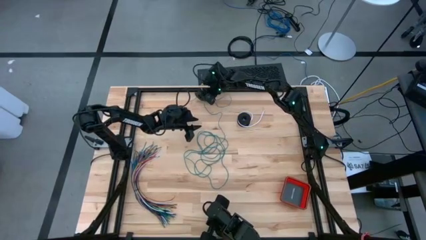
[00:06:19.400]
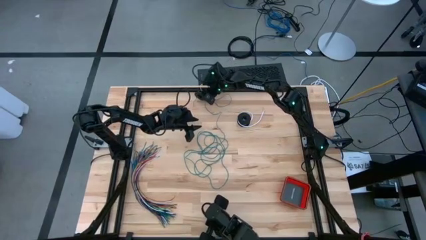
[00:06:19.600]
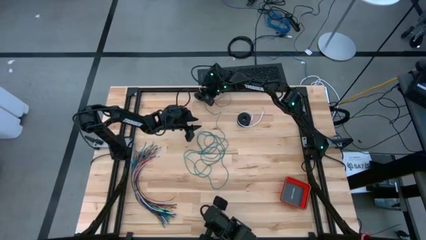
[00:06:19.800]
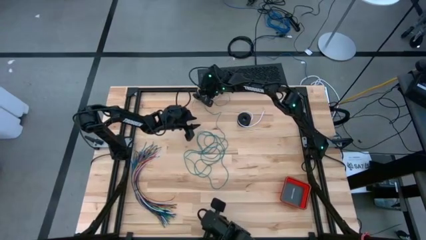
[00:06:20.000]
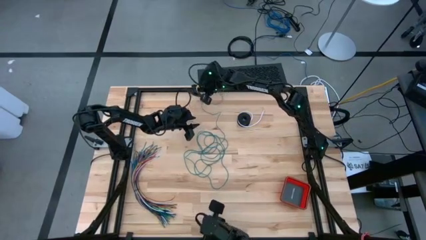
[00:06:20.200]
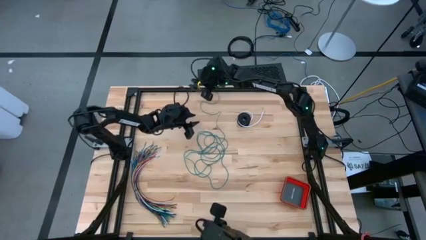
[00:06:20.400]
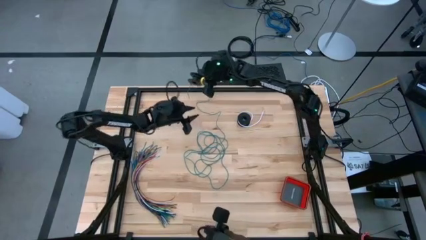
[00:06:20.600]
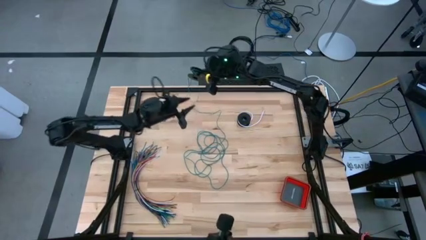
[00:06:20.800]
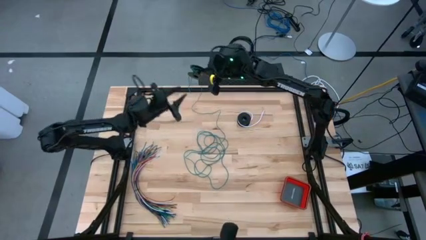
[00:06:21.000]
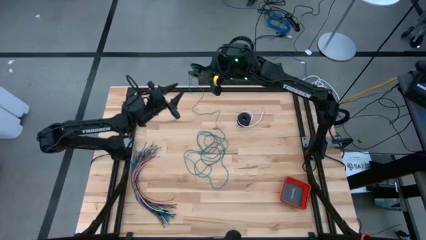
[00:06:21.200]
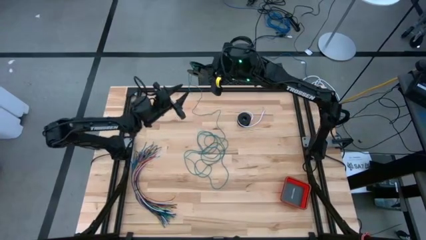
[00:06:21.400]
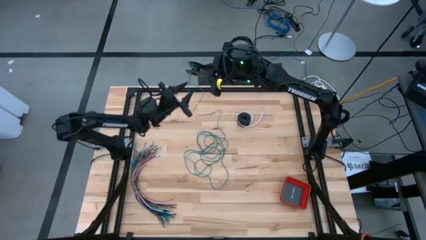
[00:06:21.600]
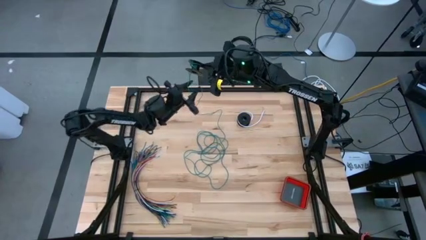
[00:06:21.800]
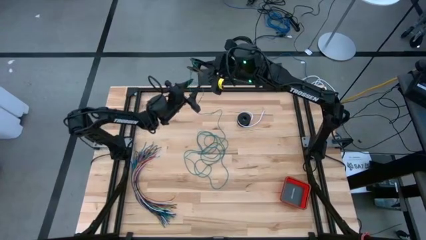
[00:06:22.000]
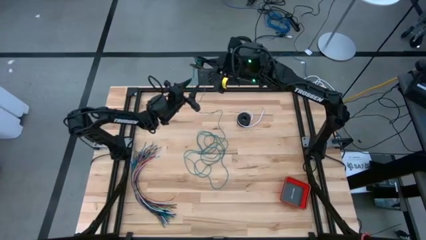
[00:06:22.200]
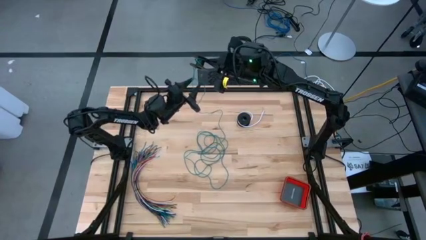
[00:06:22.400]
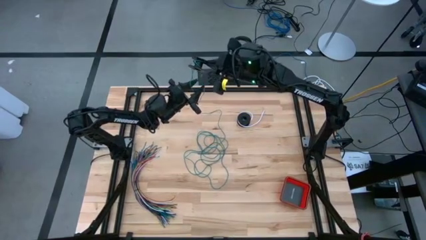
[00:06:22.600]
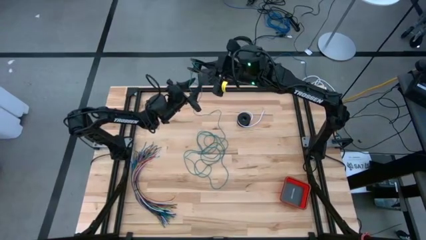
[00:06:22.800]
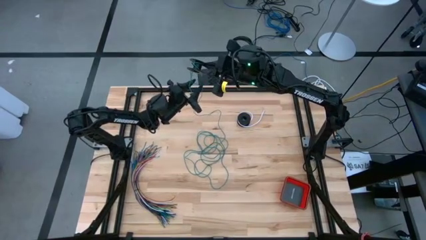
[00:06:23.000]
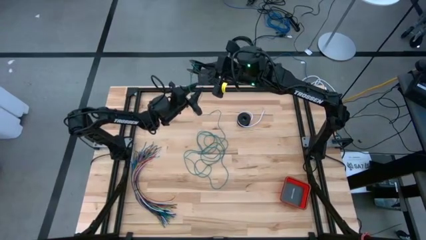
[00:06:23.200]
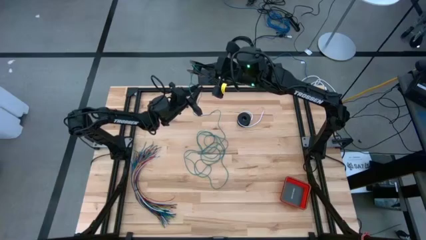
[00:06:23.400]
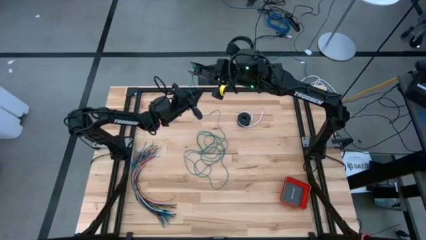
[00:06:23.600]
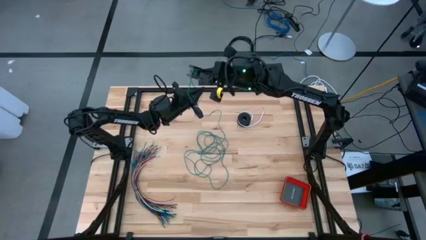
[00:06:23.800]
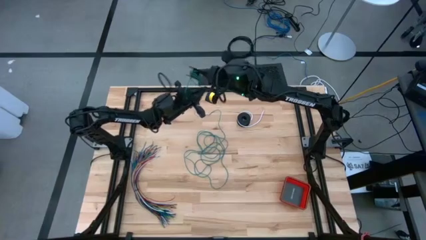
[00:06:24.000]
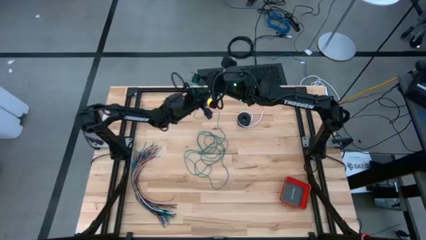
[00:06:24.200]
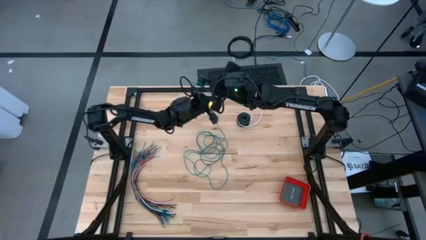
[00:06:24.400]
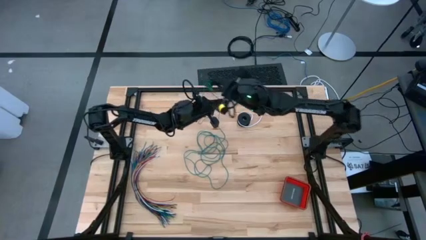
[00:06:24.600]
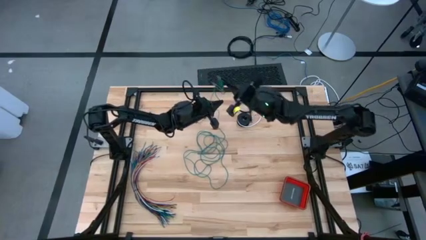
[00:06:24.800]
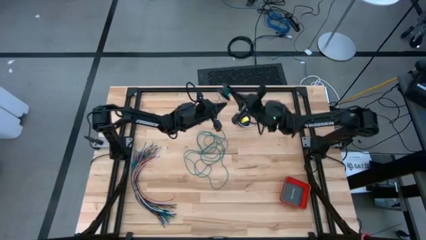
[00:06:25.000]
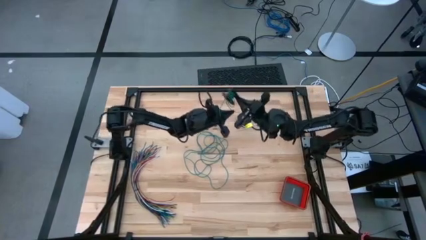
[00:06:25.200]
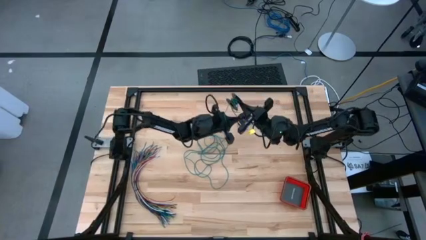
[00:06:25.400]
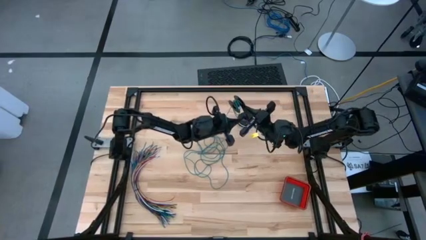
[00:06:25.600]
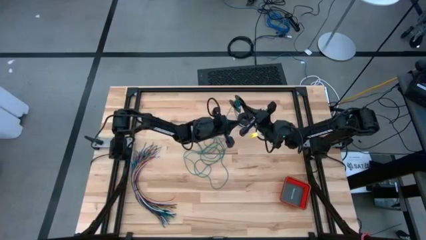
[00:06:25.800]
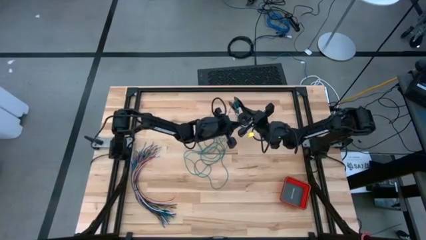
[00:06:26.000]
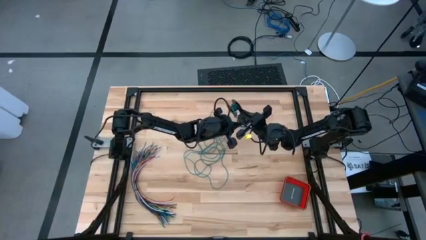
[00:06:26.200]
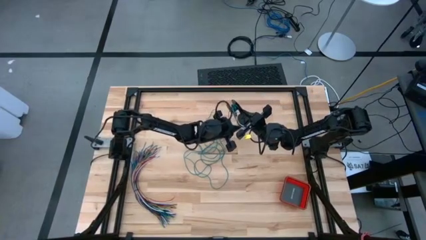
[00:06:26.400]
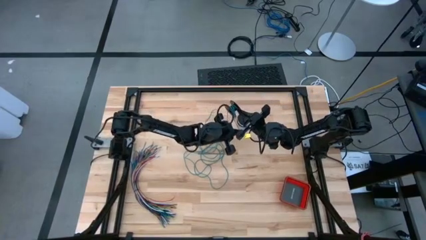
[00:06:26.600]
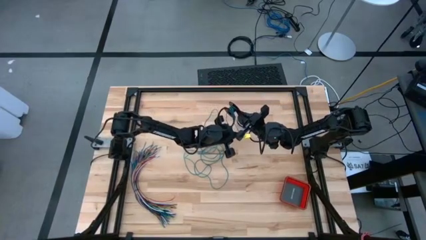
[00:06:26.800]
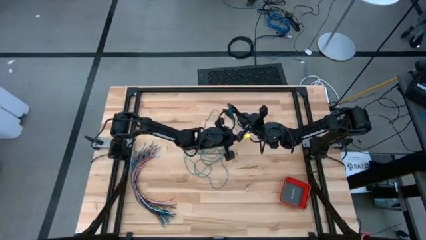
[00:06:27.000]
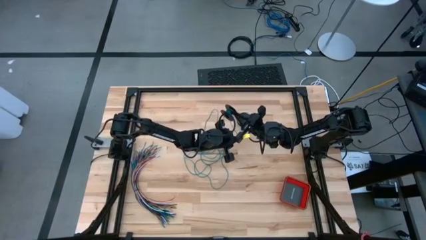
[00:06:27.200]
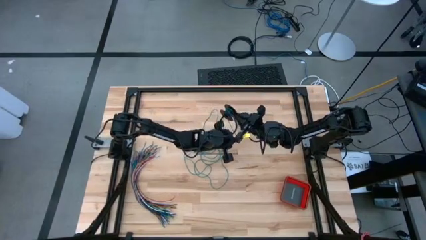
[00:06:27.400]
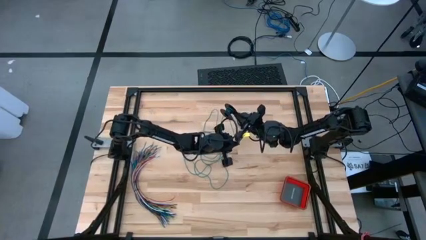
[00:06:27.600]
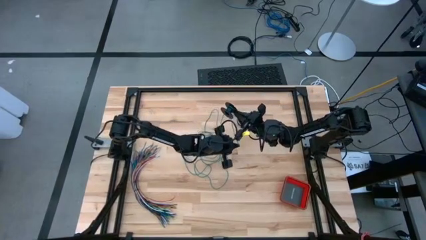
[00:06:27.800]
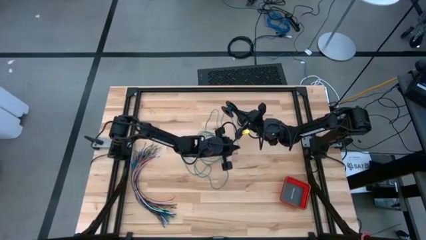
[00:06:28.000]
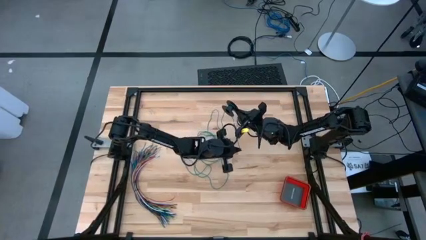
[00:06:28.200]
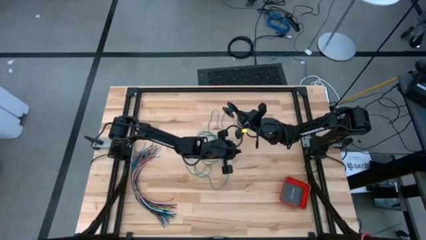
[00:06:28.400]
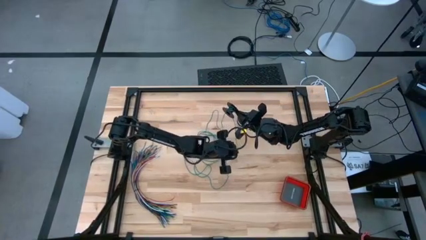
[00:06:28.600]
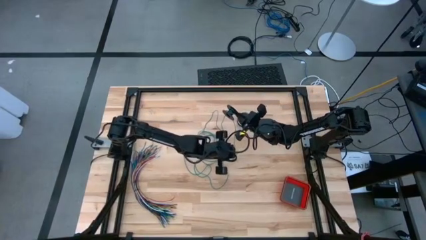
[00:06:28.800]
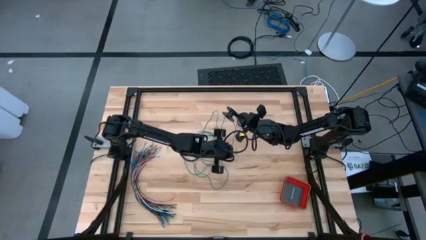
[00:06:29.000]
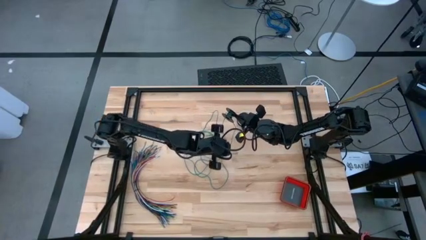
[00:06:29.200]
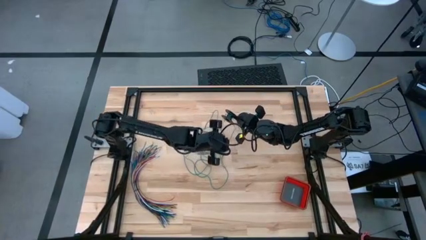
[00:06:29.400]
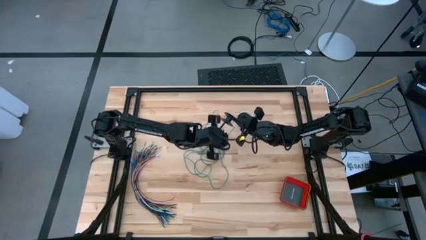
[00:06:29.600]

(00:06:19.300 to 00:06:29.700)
Task: Coil cords
Coil the green wire onto the spool

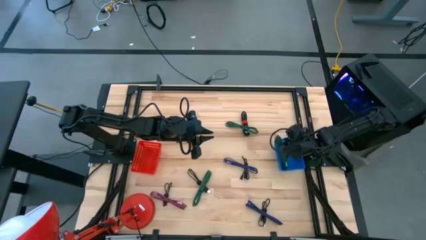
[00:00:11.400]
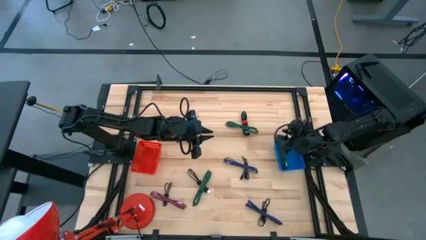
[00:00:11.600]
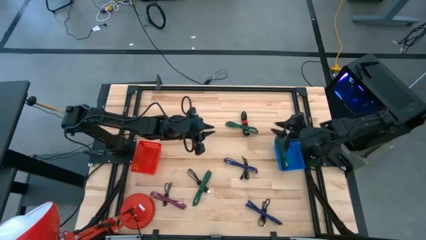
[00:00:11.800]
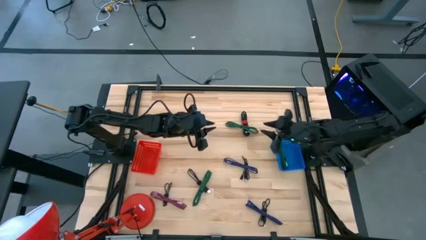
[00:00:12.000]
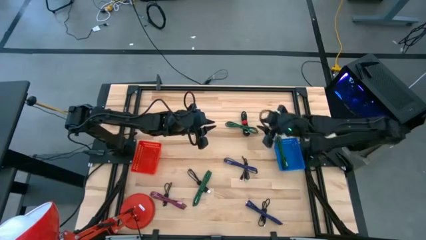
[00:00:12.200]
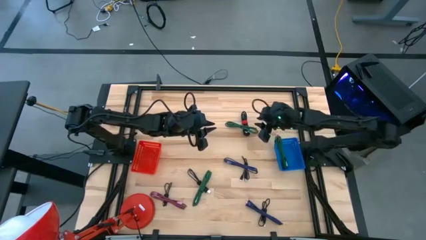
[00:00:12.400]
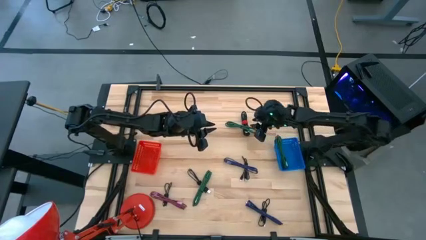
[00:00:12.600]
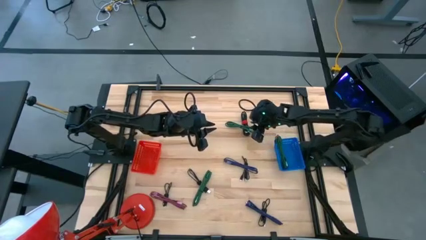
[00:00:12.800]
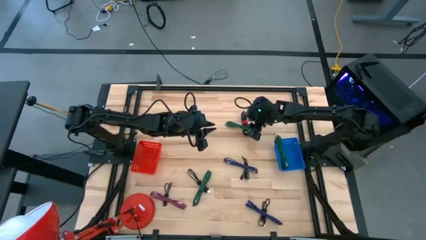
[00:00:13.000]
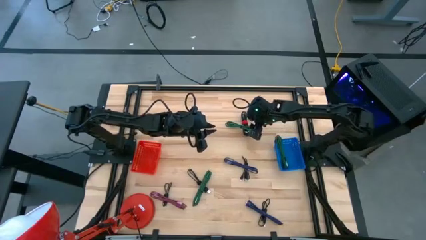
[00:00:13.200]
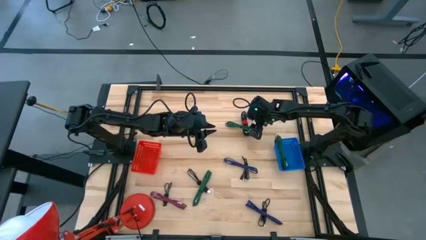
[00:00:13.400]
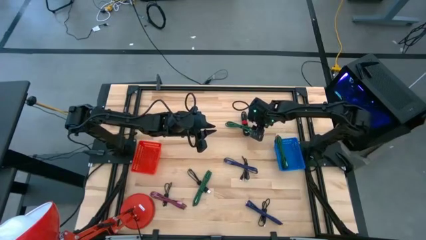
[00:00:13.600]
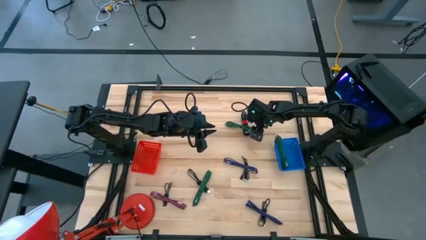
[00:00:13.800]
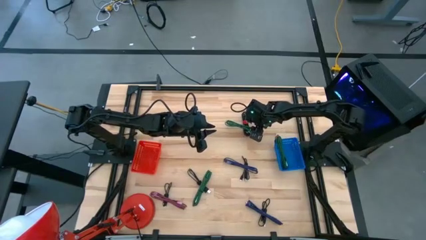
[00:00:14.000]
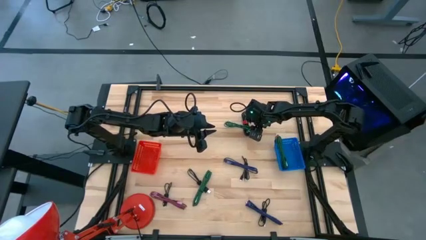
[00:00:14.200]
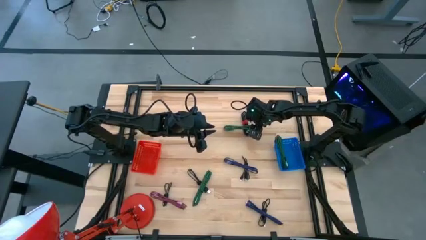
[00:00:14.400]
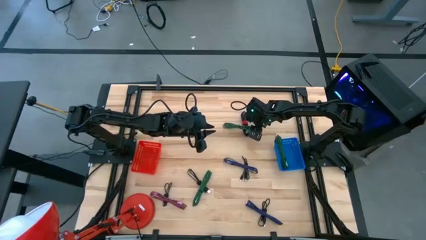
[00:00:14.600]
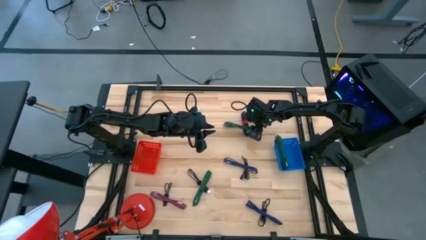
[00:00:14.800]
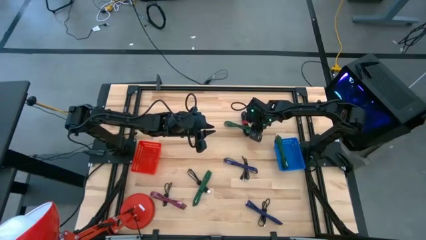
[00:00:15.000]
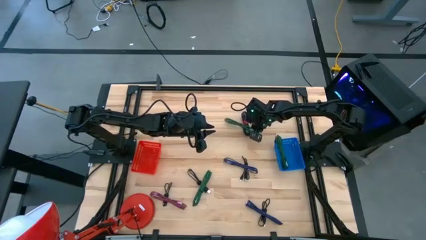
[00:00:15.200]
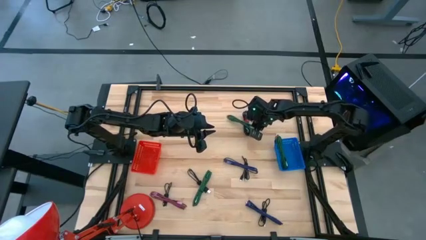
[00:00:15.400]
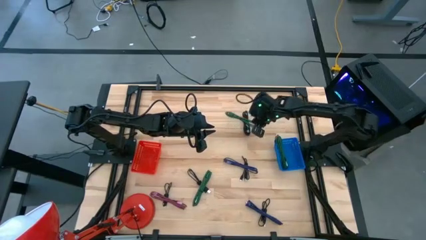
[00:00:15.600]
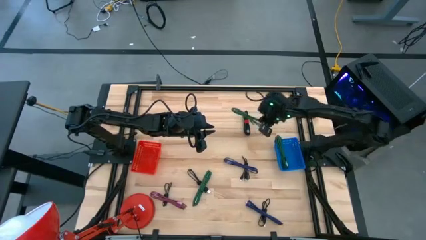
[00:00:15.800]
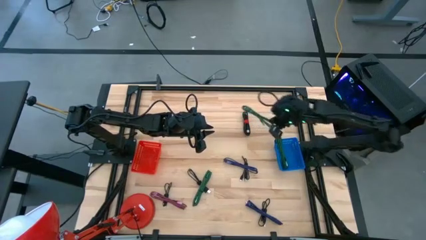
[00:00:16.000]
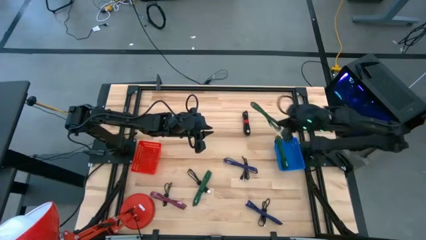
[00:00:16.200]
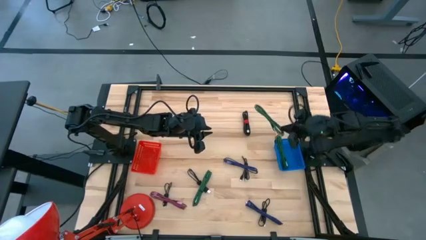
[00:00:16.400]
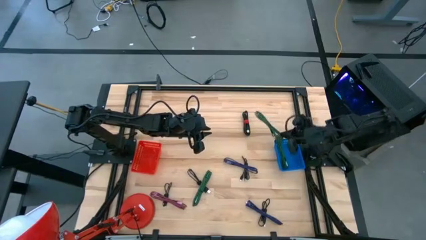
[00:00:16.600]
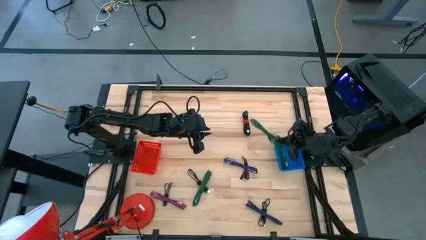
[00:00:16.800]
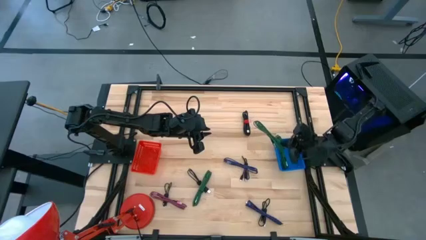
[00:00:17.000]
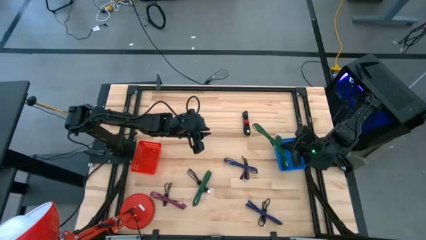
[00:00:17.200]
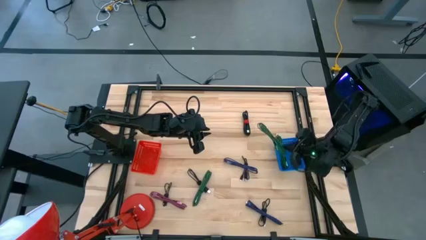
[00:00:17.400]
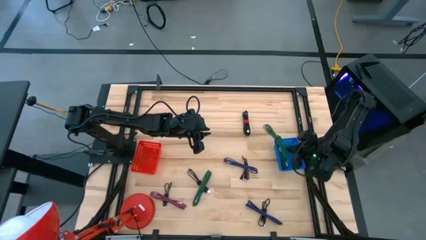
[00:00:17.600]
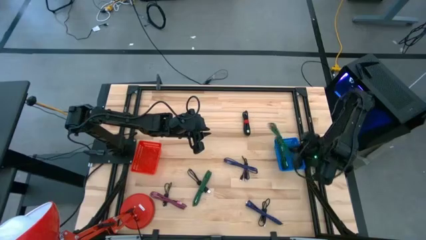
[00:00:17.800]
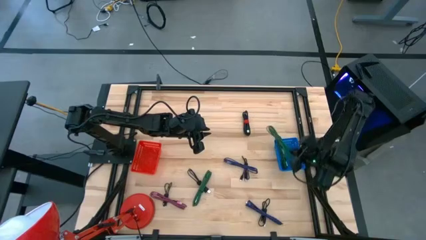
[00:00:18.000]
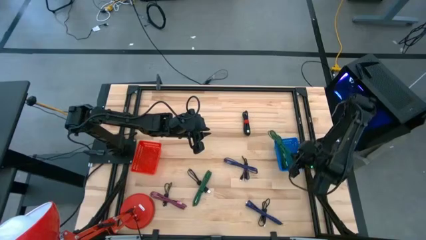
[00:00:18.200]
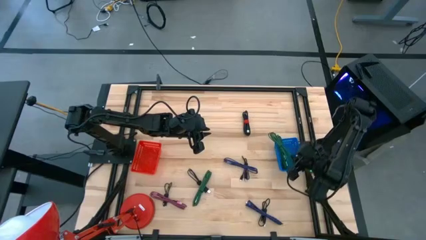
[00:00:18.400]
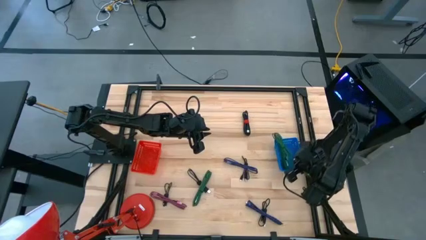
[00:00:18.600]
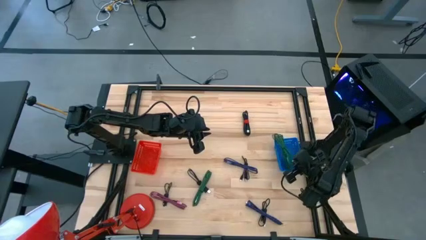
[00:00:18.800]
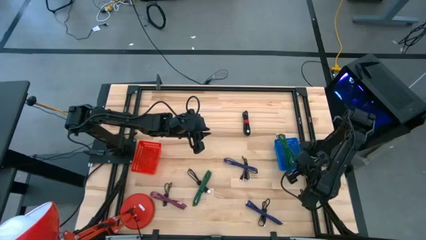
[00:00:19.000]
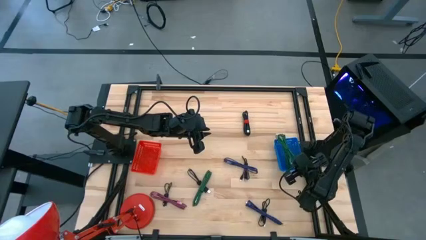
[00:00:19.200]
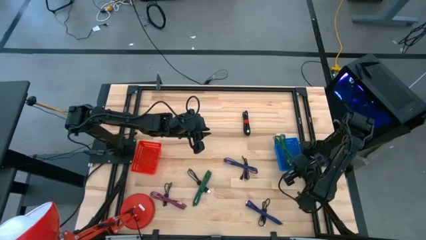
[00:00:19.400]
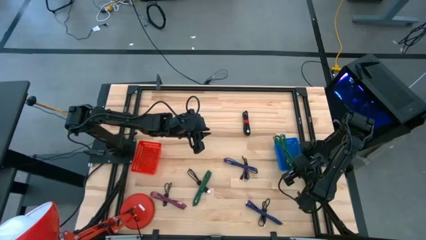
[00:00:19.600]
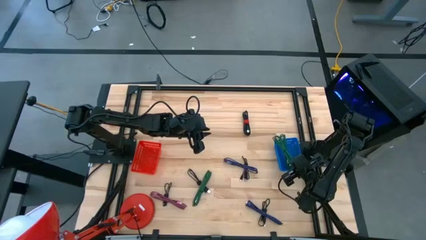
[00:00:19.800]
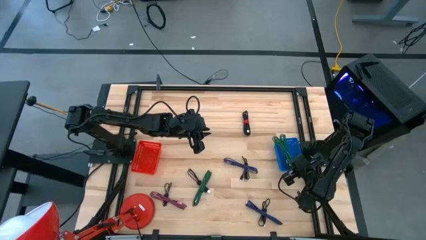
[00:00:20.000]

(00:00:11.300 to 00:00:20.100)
Task: Pick & Place USB Port
Put the top green charger cable into the blue bin
